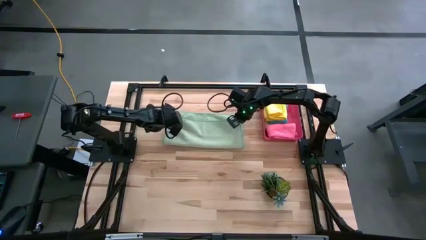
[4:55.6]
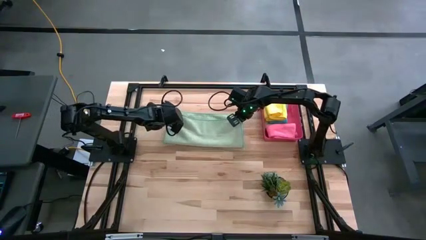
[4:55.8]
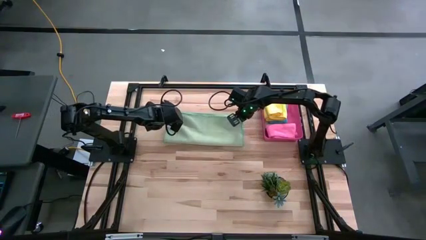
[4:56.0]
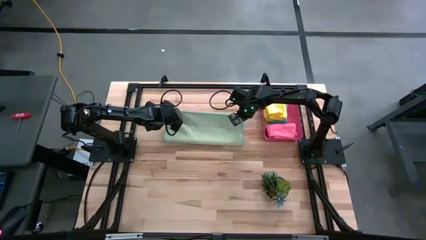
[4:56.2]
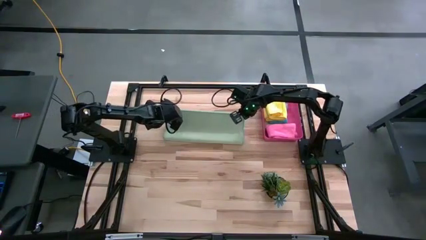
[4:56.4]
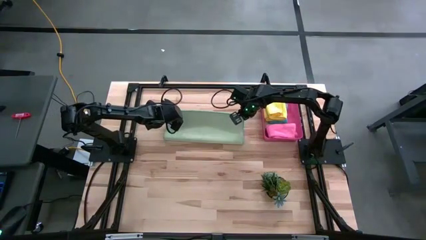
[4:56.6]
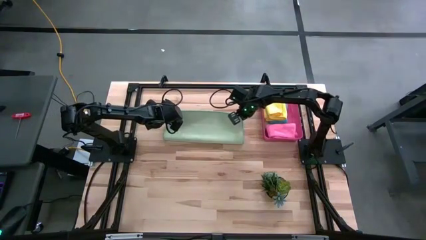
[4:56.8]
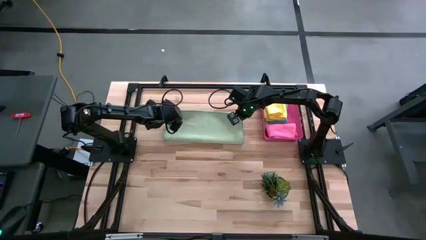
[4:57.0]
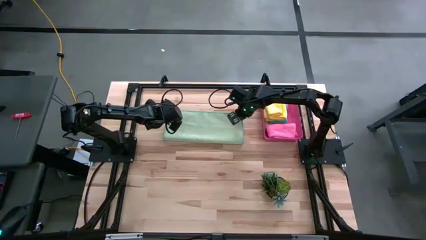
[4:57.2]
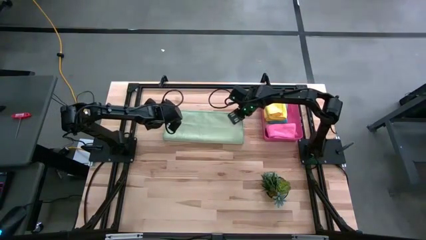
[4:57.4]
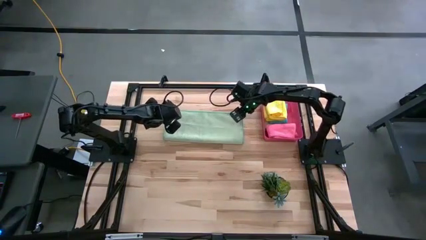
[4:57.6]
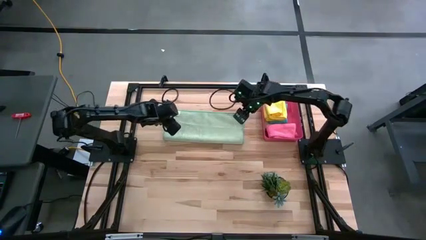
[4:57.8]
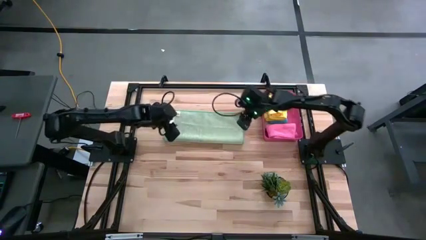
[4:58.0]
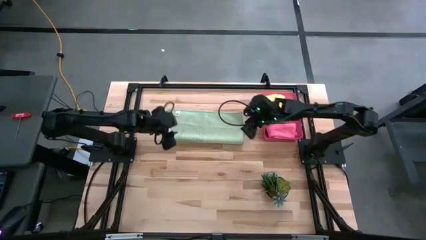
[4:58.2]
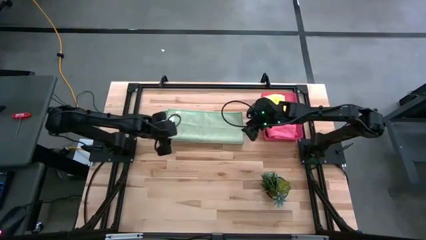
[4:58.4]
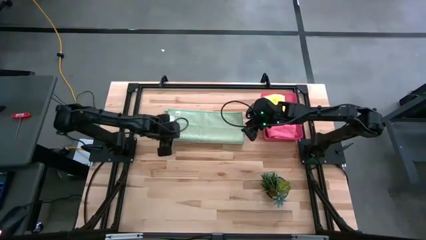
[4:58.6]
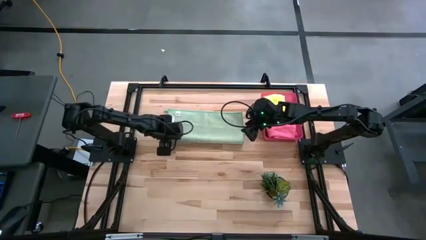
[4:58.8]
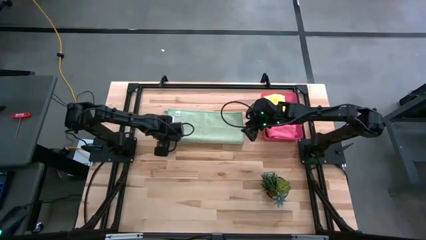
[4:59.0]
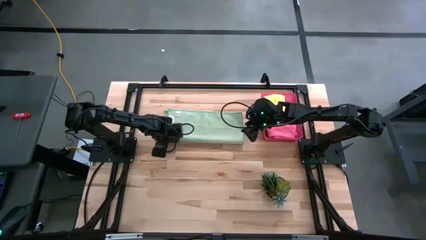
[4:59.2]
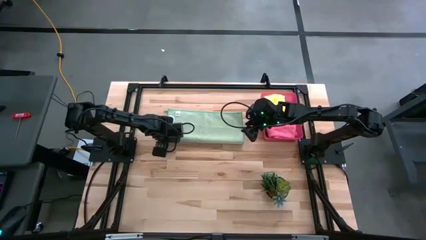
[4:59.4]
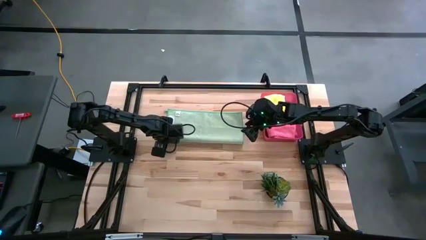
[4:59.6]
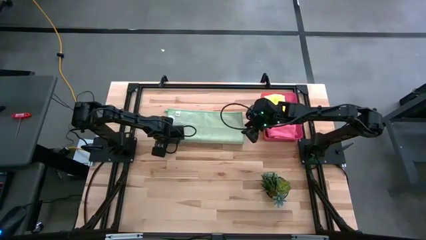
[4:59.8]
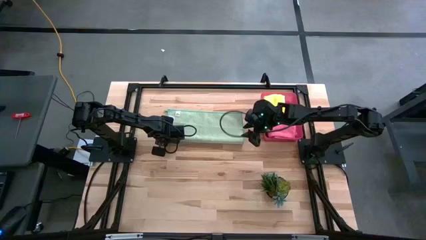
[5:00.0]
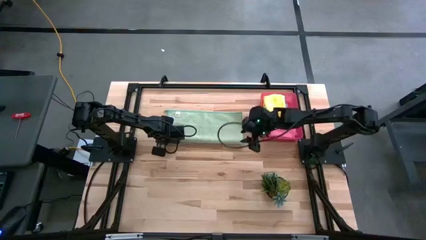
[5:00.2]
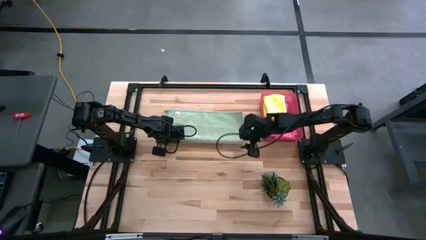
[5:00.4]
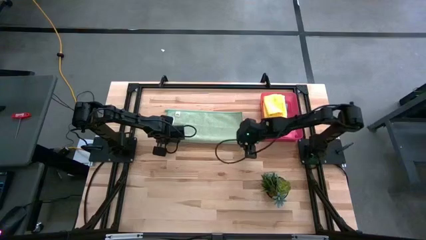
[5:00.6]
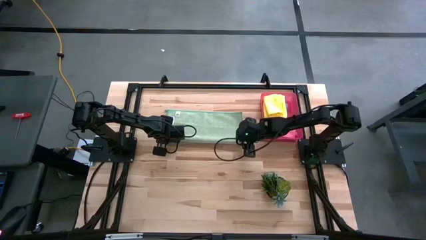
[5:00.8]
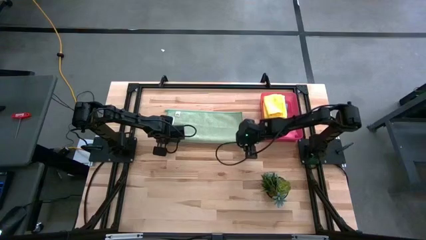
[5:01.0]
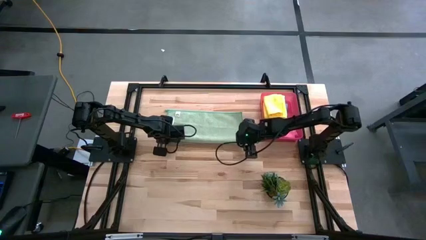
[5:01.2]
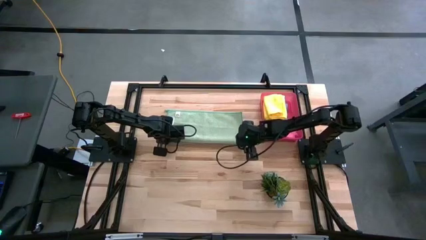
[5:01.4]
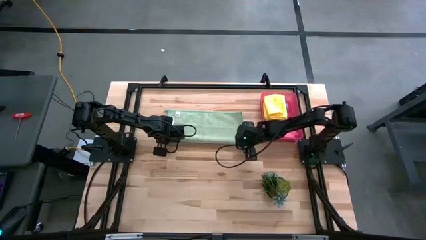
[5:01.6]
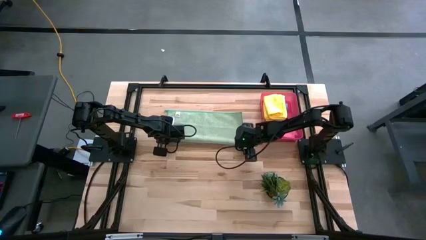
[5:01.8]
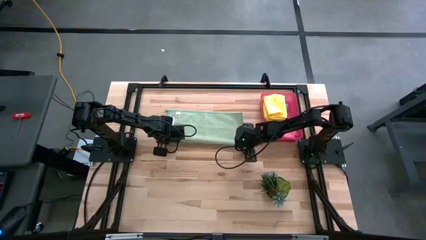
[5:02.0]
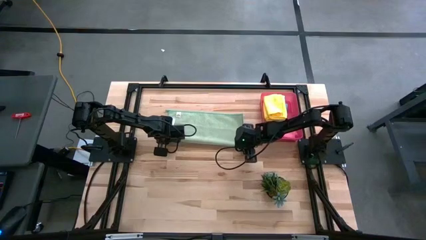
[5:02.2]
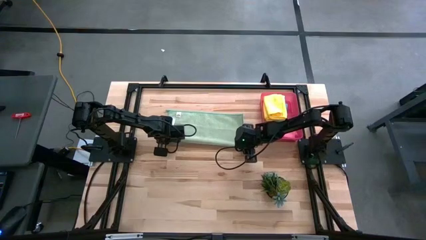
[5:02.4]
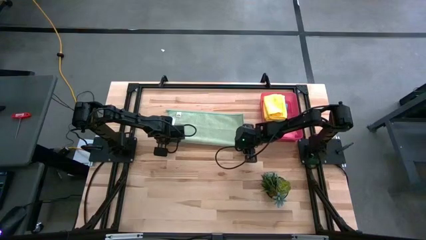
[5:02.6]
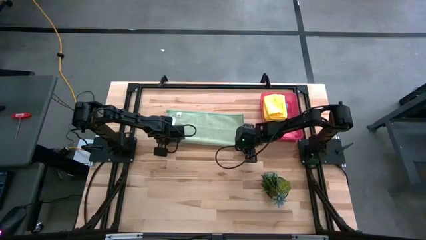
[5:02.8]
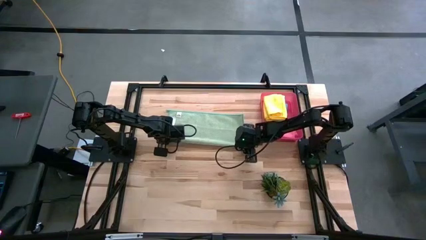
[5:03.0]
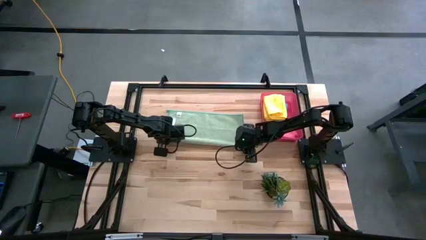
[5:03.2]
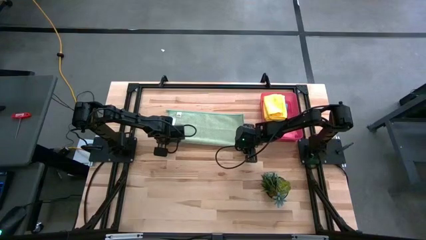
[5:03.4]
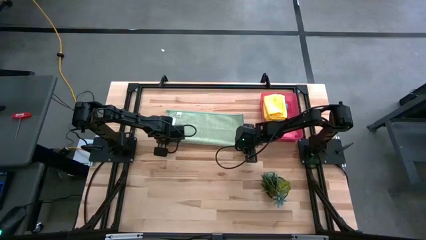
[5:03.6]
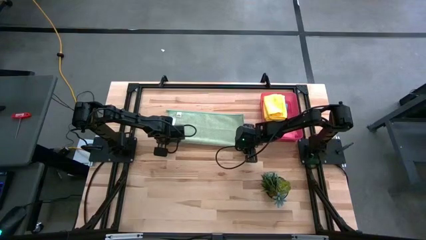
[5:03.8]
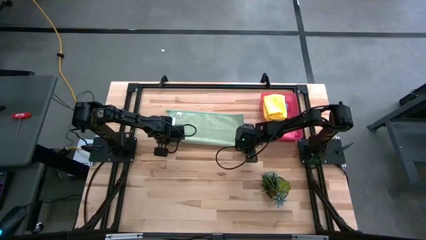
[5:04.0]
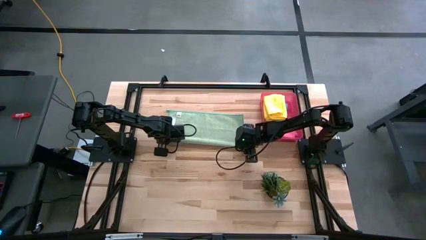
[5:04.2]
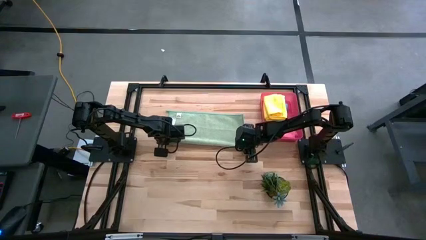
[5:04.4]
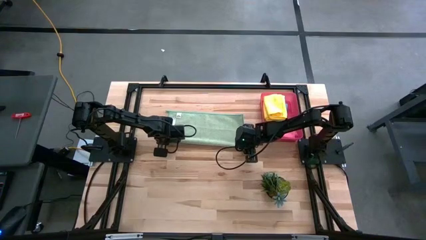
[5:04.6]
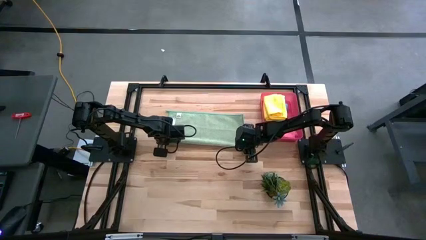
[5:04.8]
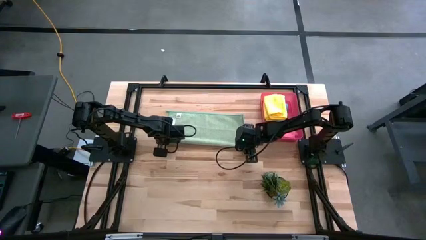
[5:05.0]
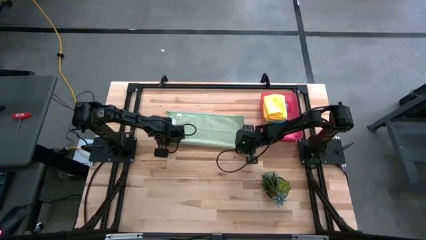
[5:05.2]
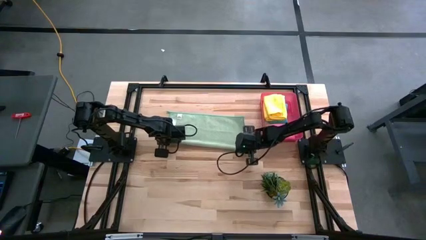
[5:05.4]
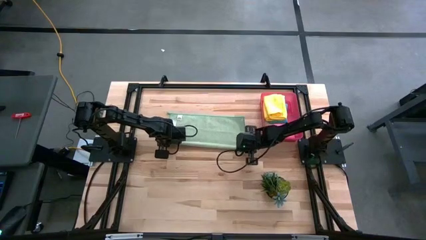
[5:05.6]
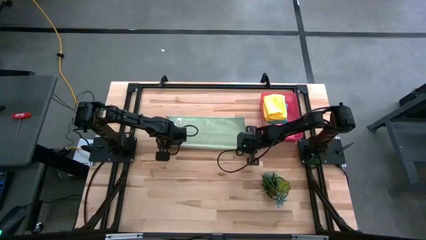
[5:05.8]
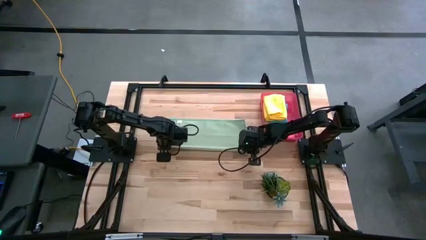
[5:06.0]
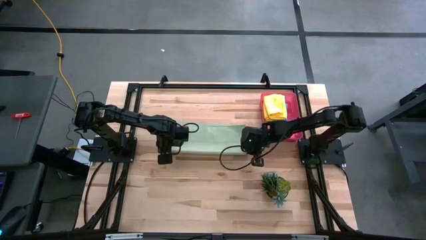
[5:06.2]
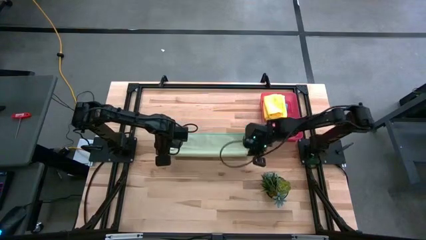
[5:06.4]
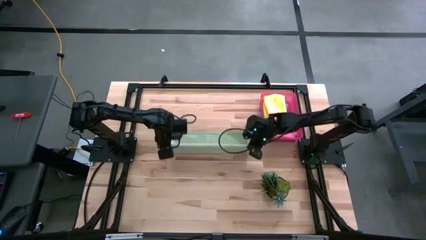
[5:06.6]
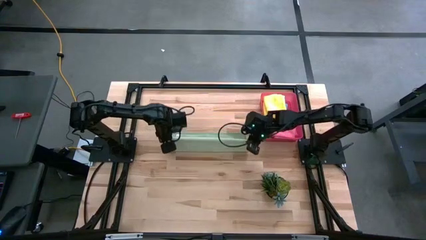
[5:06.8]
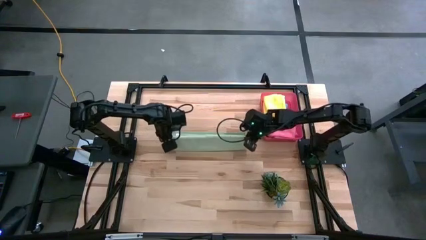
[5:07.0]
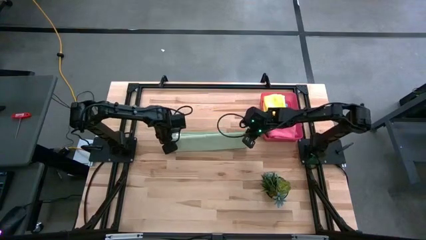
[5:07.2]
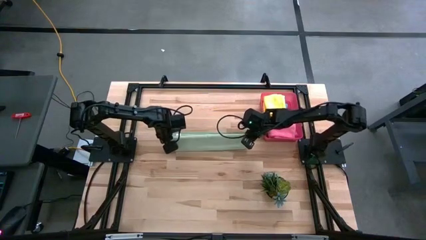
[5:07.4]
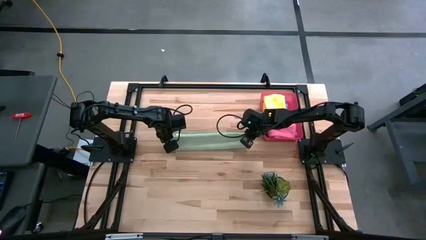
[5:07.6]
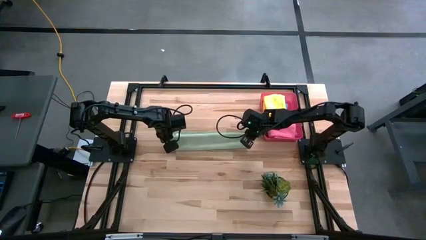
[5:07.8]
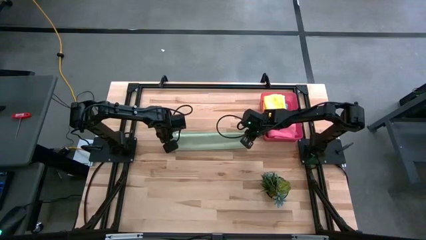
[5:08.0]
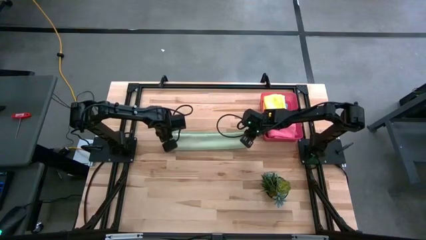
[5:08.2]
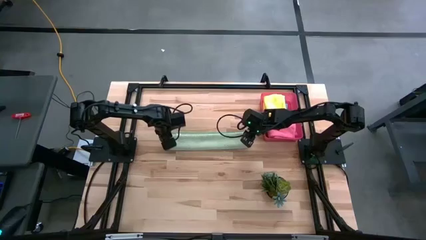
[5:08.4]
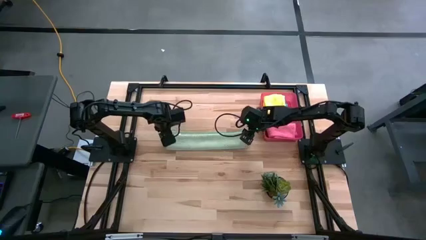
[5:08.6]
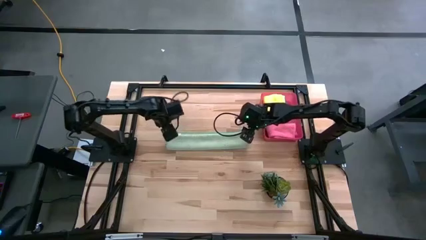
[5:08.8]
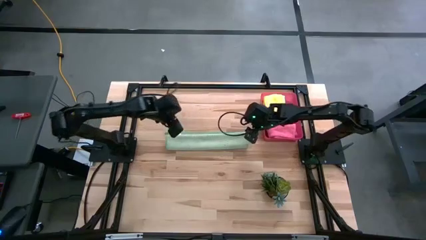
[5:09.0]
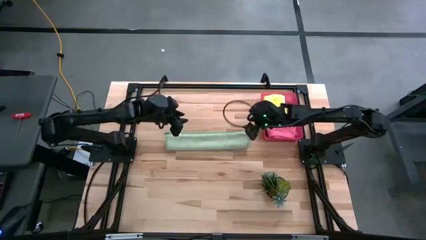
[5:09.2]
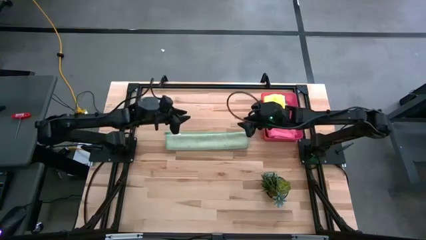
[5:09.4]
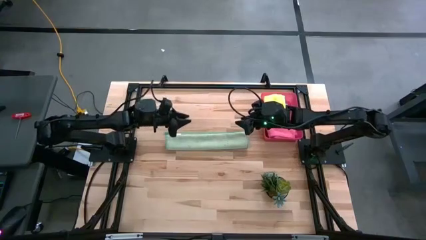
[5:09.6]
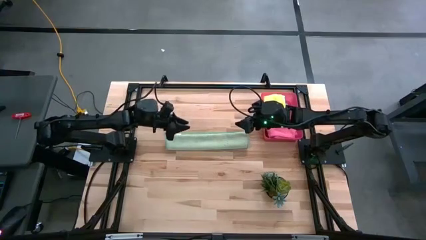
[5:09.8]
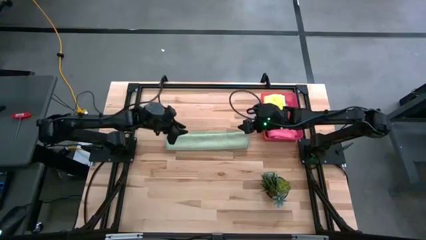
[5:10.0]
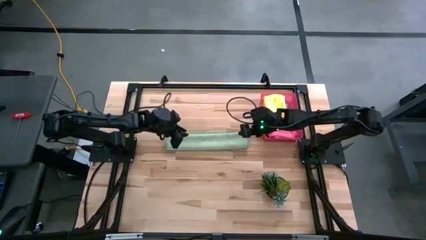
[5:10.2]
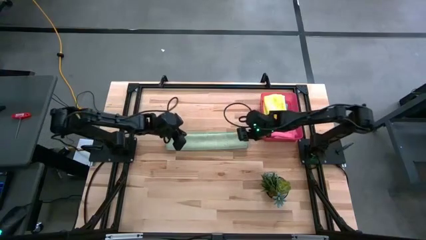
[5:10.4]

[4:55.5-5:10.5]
Task: Fold microfiber towels
Fold the light green microfiber cloth

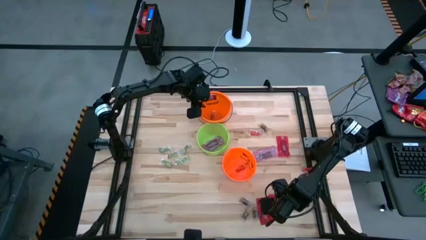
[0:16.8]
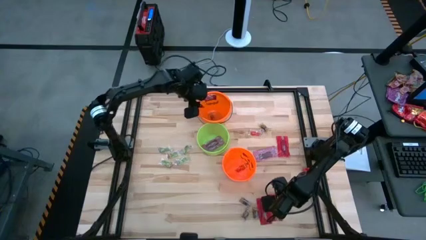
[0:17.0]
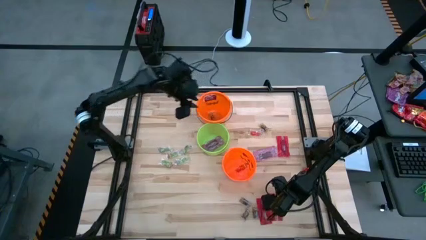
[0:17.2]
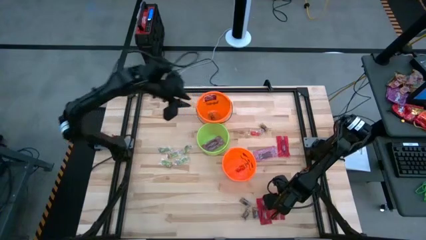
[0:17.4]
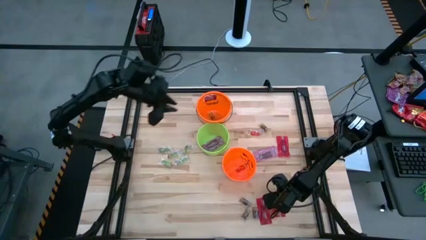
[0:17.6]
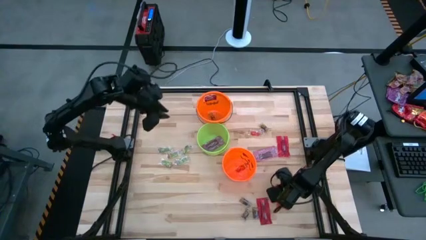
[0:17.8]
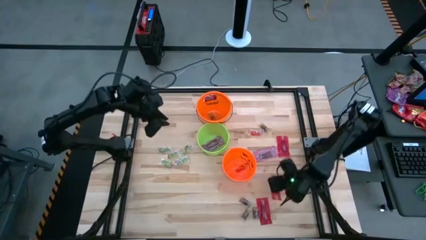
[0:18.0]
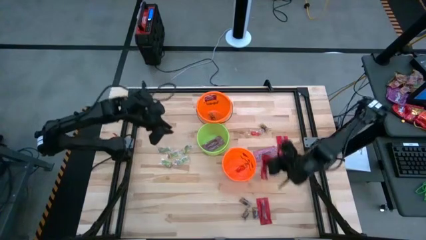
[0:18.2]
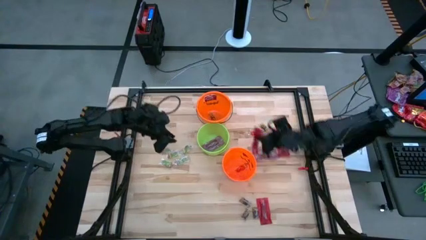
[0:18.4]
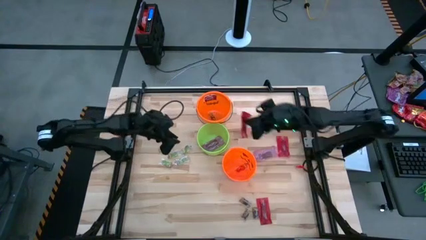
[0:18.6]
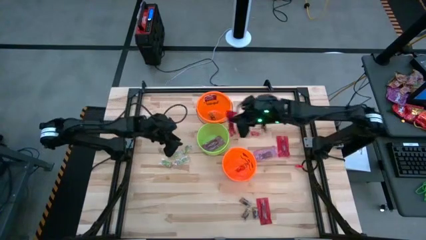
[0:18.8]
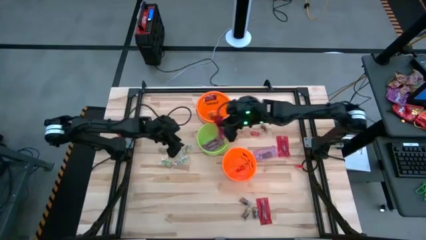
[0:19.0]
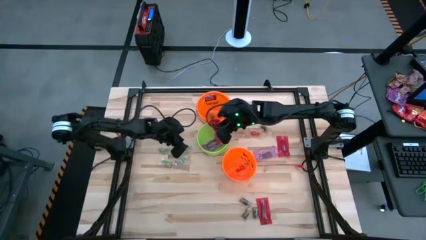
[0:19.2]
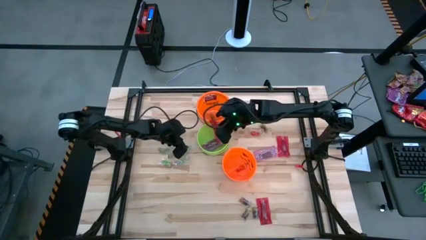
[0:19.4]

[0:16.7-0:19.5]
Task: Sort candy by brand, put in halloween buckets
Put the red candy into the green bucket
